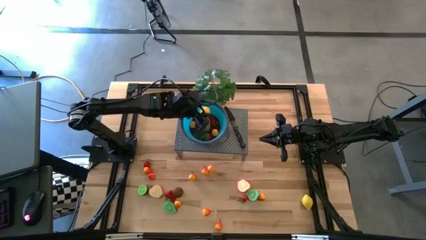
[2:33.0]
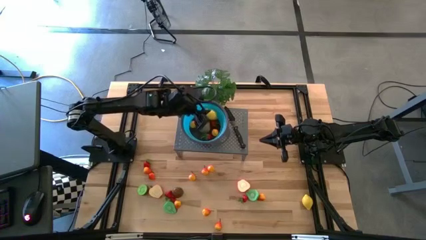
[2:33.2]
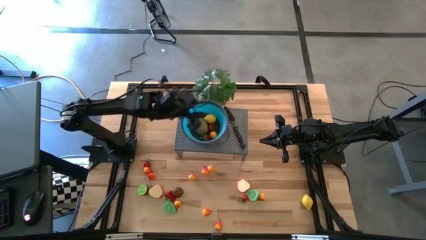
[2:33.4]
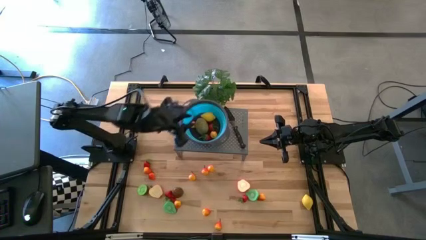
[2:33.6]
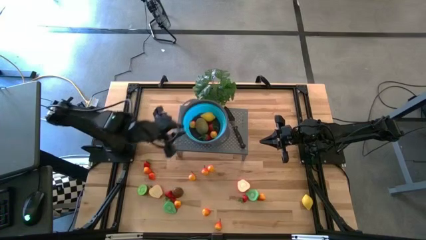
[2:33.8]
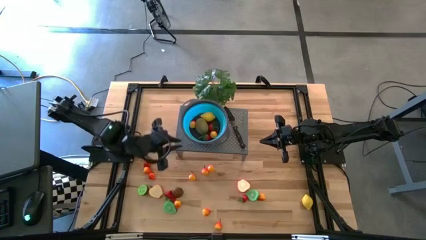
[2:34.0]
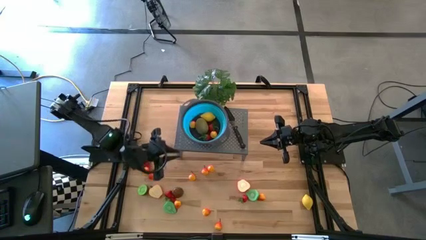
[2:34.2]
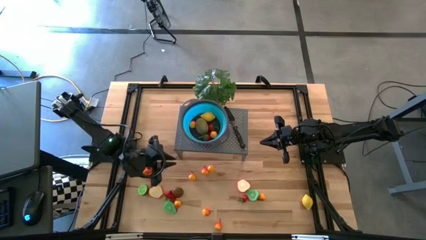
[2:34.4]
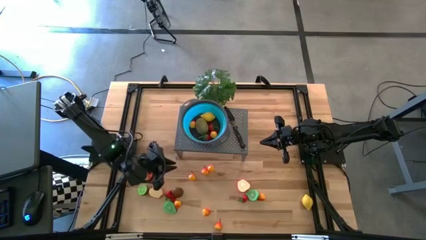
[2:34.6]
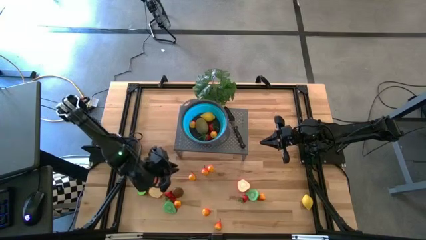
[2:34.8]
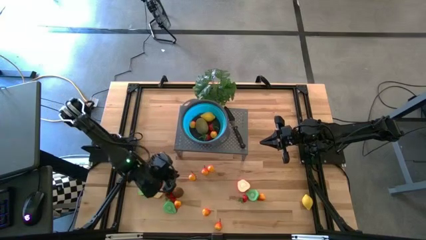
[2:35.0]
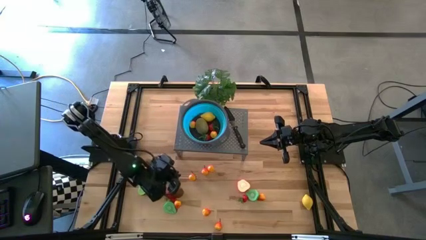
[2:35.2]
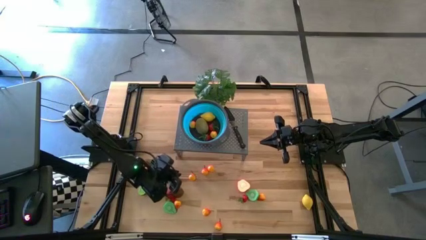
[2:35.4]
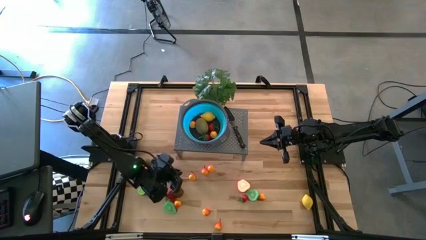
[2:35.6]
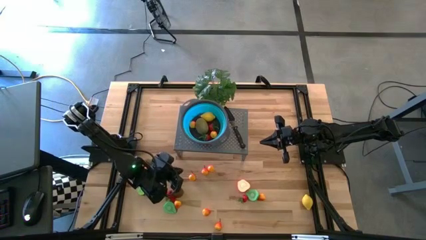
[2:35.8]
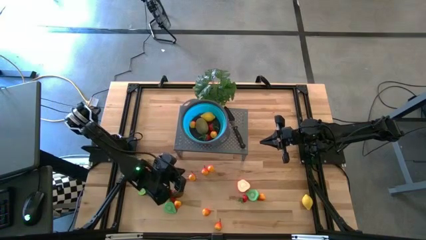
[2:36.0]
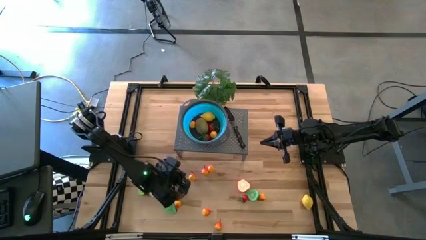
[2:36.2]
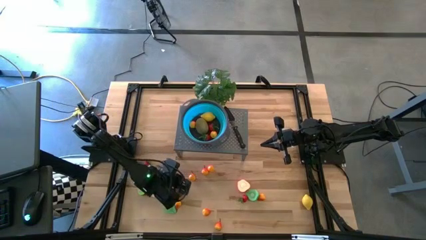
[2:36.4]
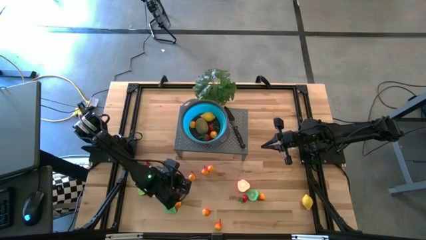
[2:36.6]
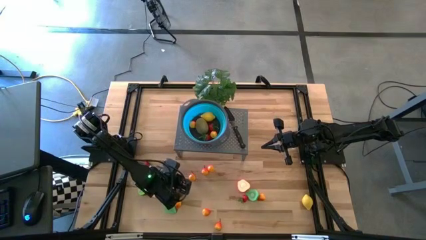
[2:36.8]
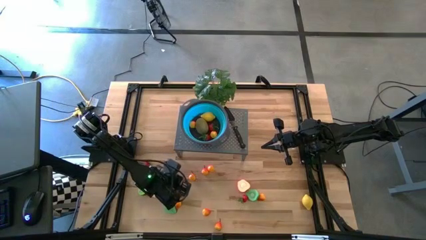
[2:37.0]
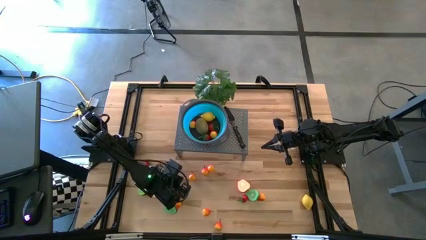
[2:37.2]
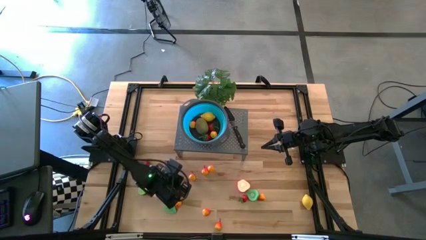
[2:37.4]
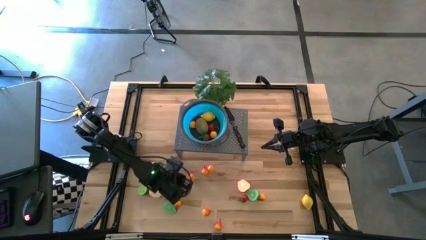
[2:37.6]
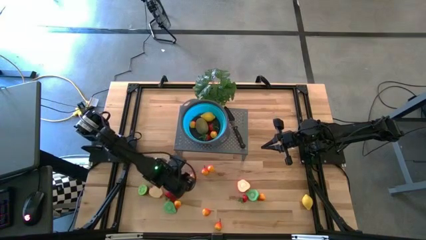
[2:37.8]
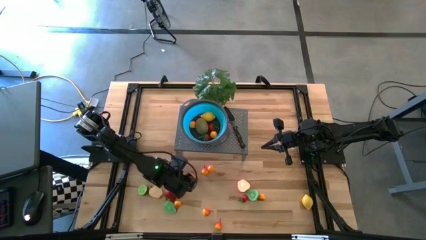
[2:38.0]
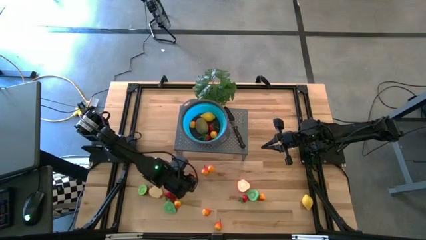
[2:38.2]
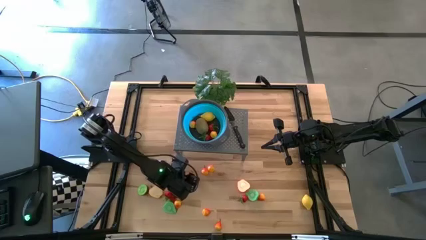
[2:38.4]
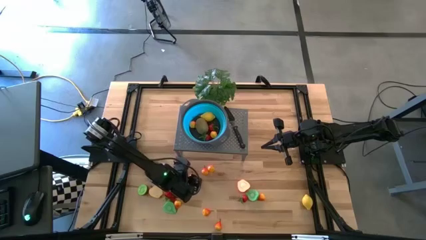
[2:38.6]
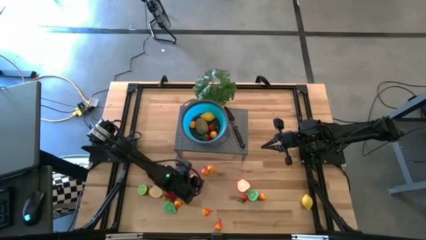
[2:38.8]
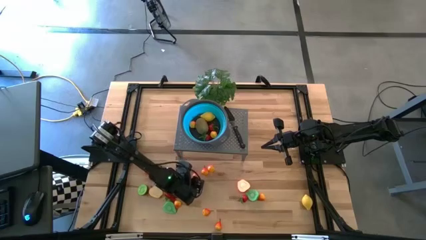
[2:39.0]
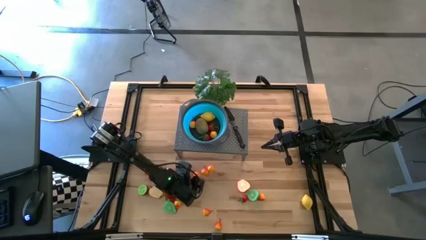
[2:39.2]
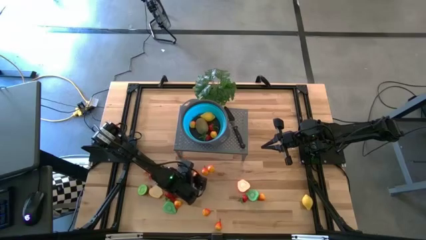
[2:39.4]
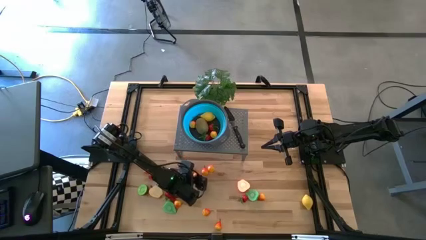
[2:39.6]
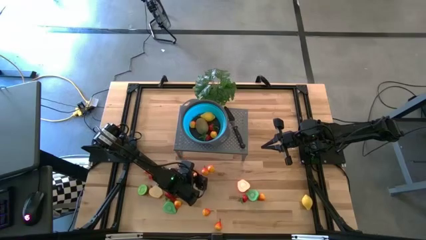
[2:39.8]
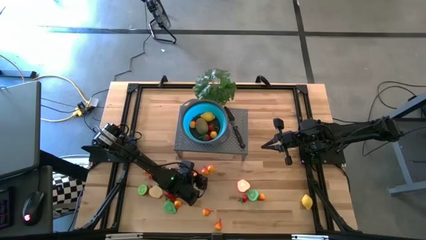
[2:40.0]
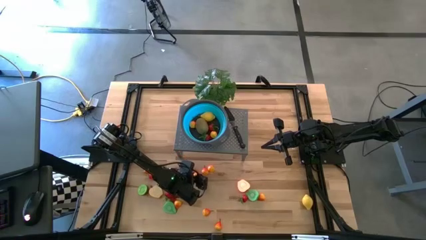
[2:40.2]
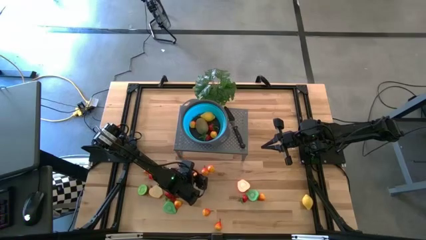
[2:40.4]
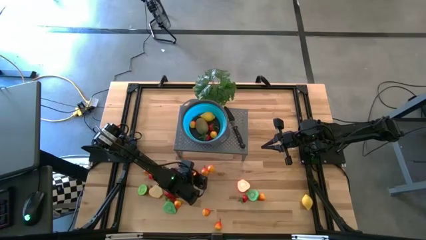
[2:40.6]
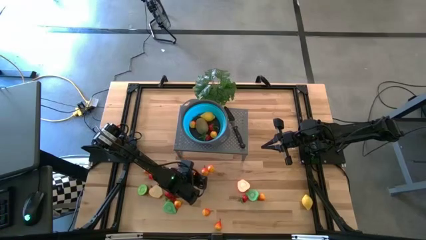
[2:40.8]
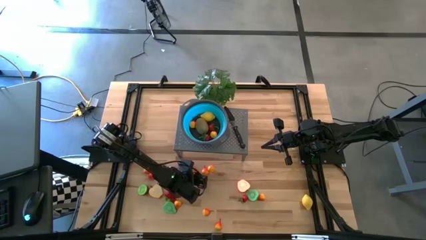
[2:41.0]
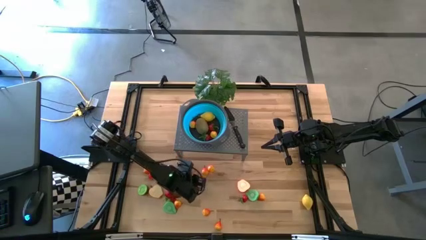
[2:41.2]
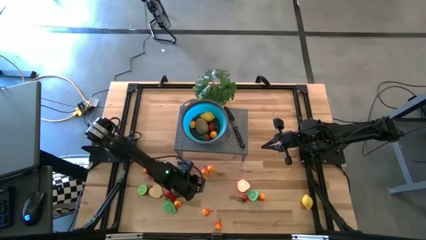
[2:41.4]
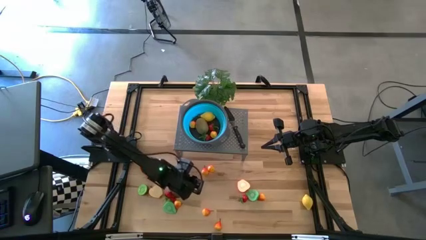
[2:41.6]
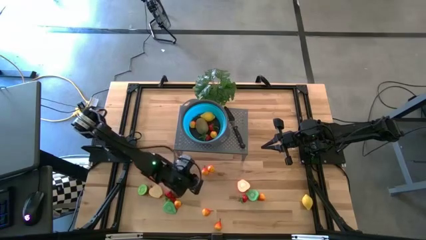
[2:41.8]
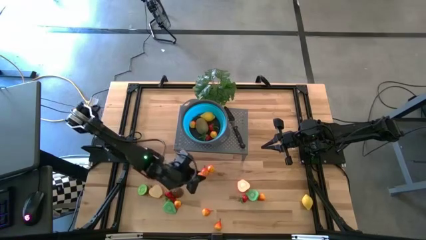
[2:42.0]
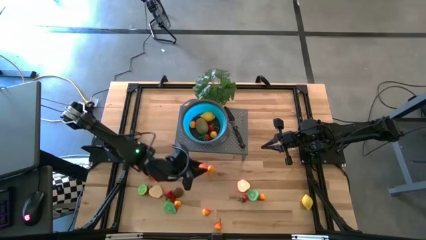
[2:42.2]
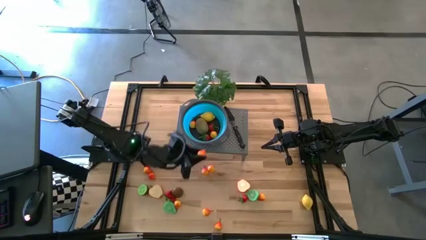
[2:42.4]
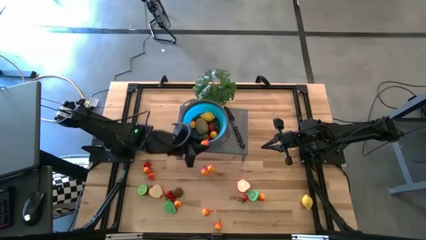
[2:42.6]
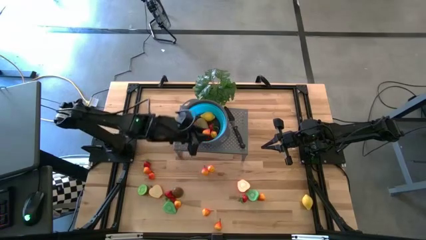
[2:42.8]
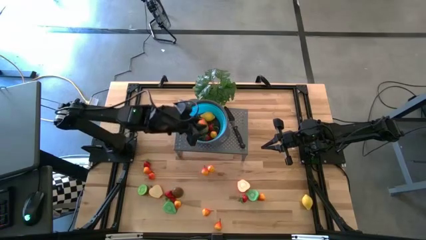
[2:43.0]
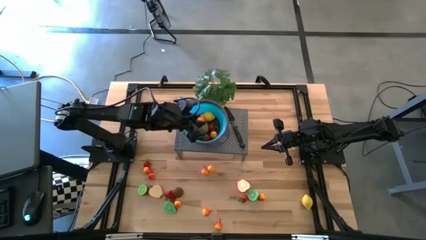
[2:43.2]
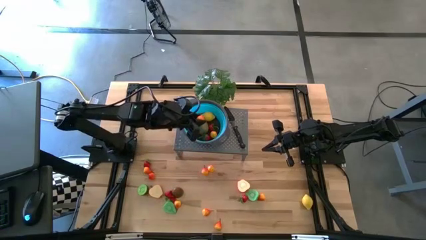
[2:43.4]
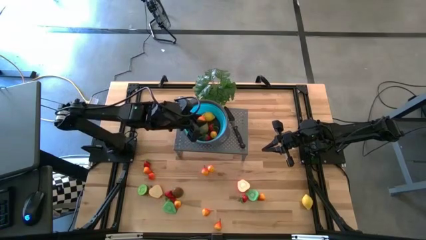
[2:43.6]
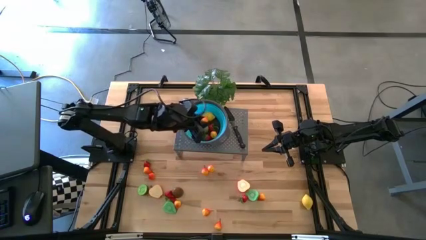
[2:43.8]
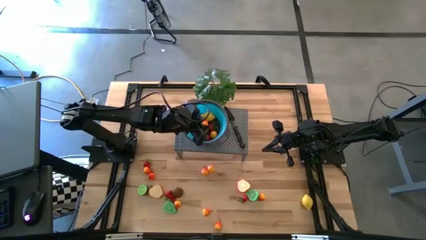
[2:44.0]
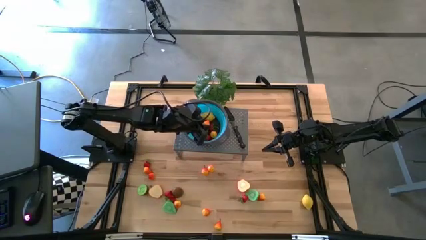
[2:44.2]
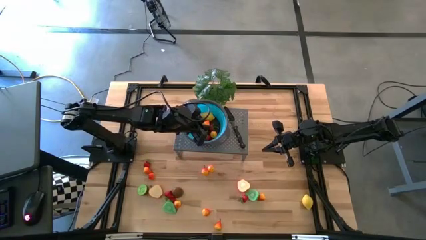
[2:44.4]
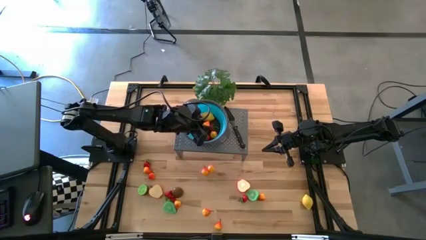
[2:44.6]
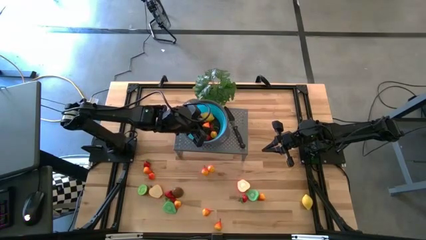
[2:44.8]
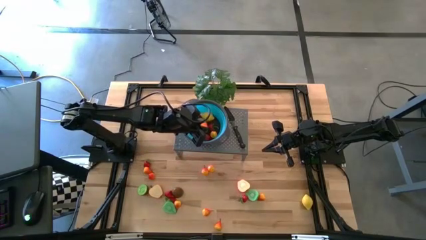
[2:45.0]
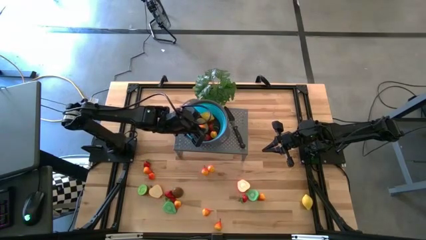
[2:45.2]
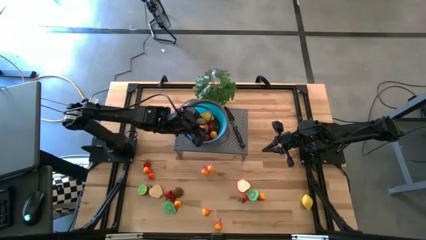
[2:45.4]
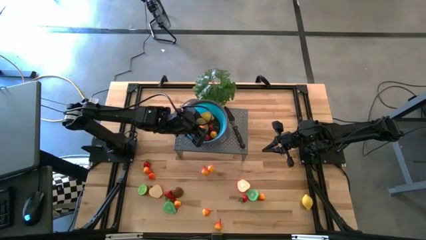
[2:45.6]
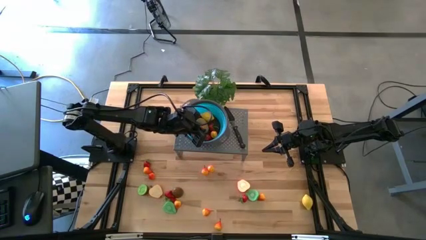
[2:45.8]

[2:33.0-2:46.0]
Task: Pick & Place Fruit
Put the pear into the blue strainer bowl on the shelf
